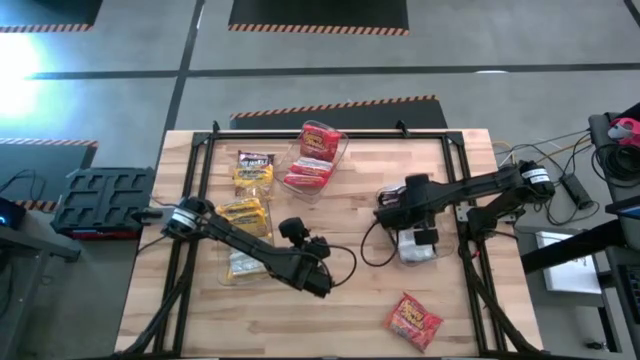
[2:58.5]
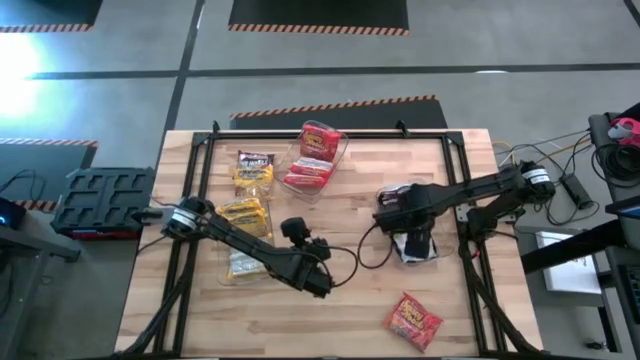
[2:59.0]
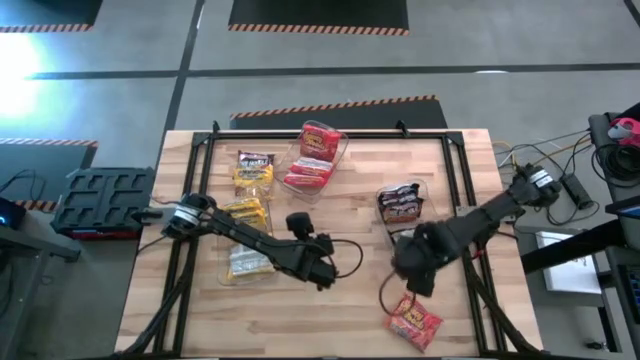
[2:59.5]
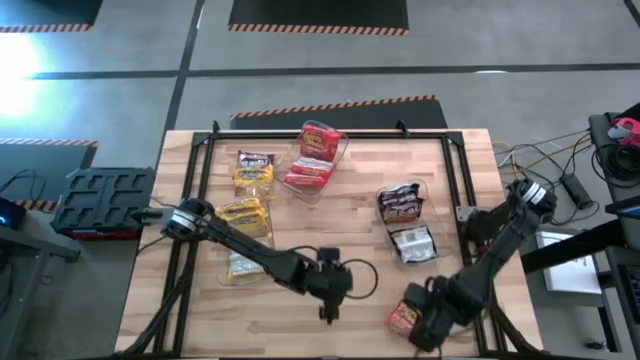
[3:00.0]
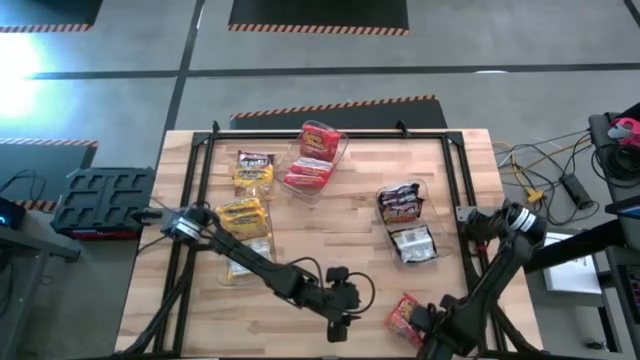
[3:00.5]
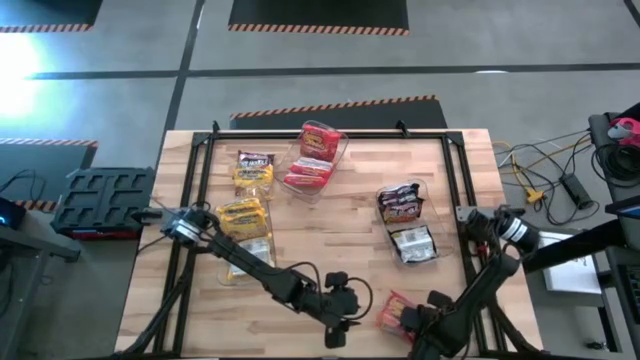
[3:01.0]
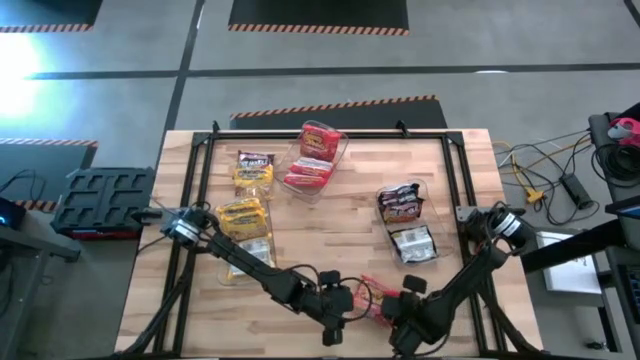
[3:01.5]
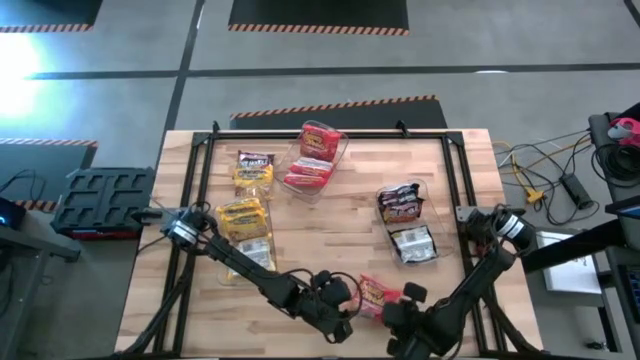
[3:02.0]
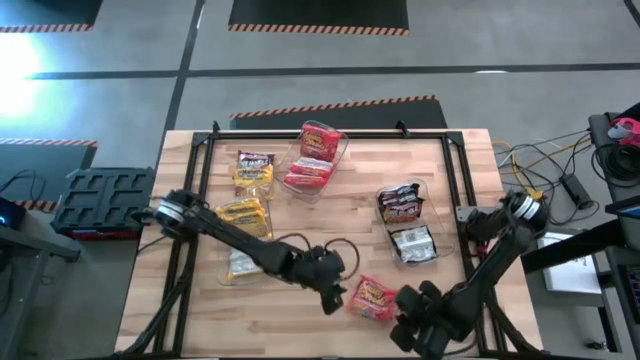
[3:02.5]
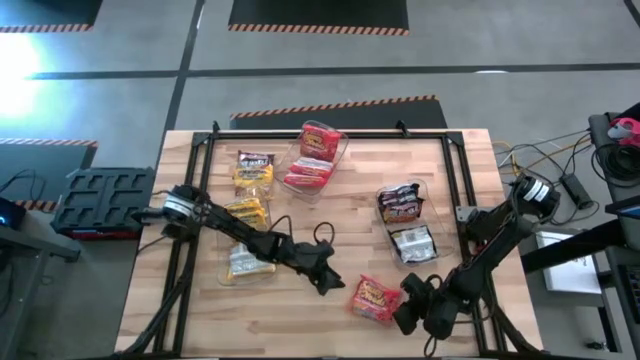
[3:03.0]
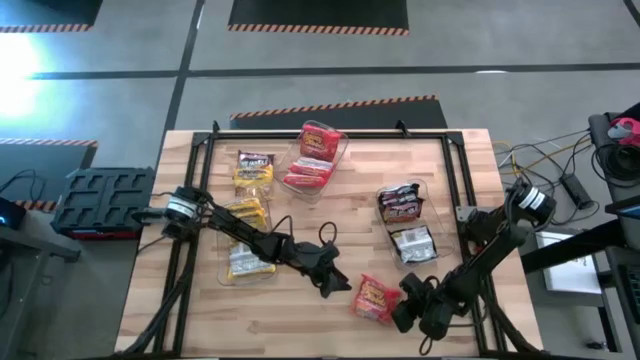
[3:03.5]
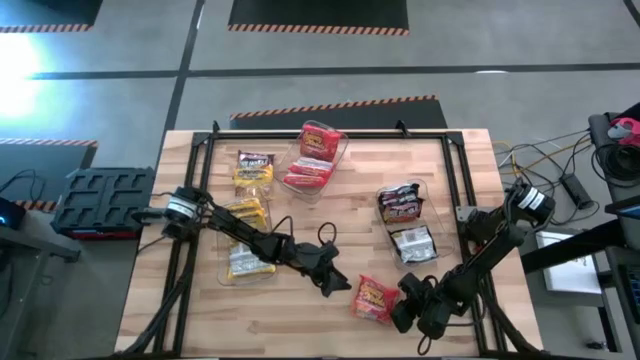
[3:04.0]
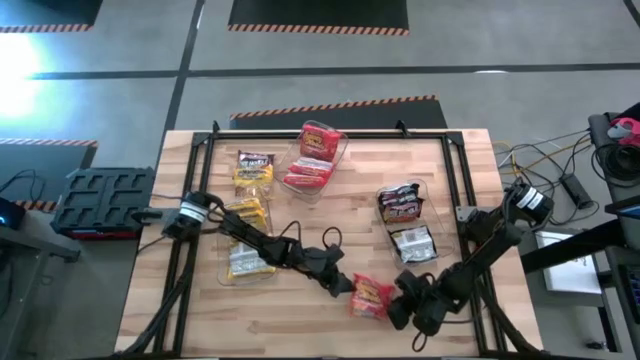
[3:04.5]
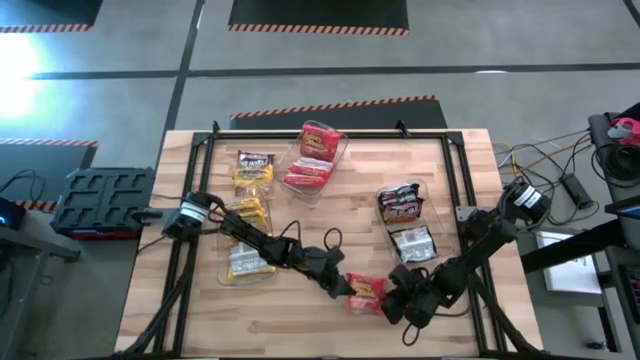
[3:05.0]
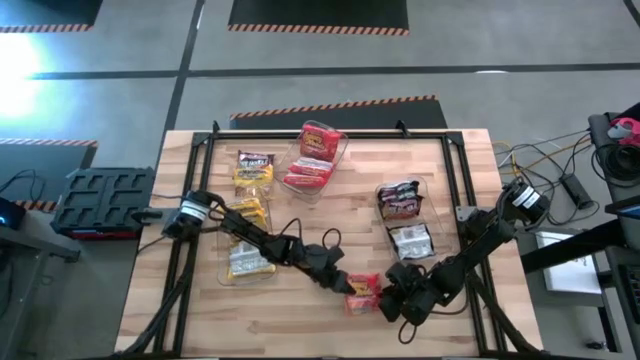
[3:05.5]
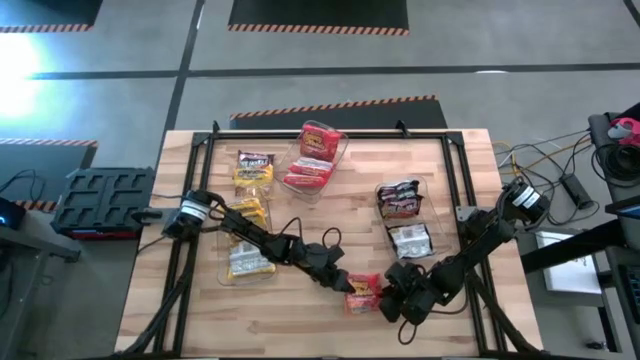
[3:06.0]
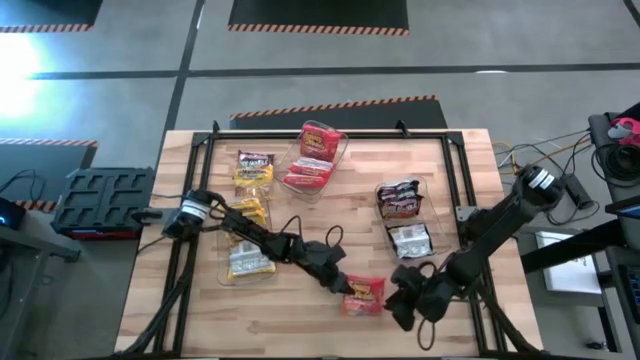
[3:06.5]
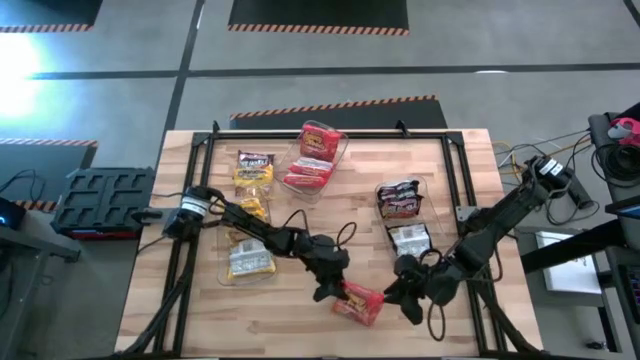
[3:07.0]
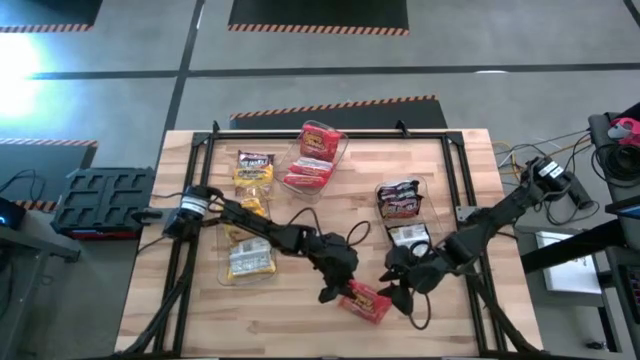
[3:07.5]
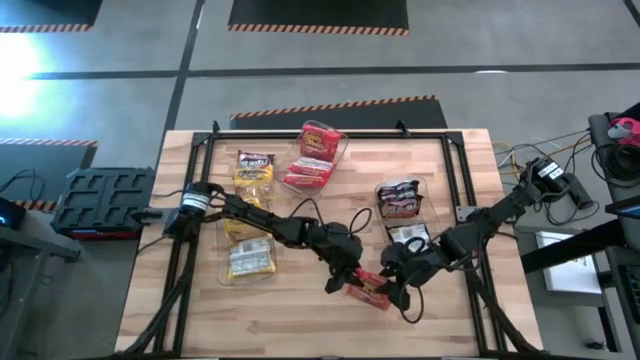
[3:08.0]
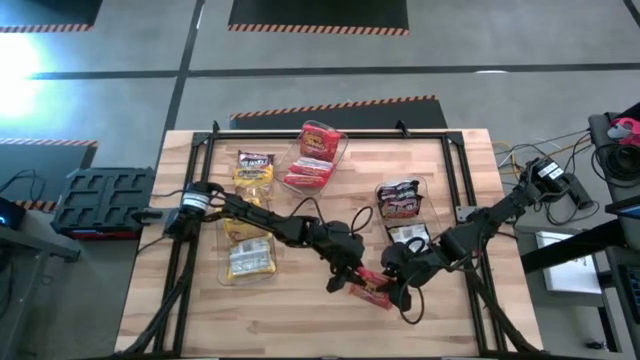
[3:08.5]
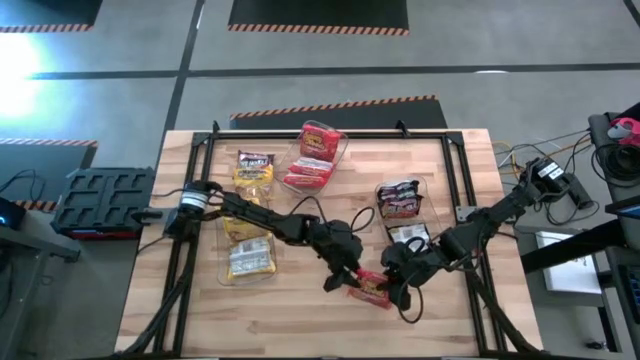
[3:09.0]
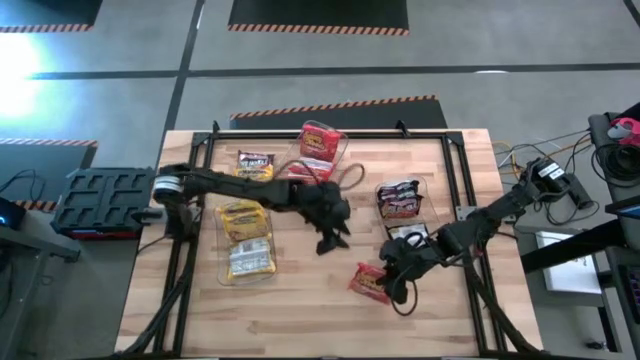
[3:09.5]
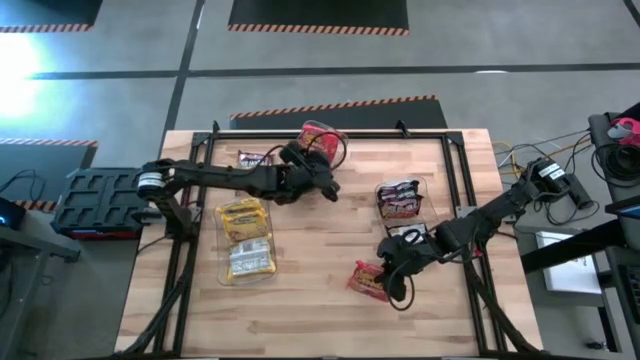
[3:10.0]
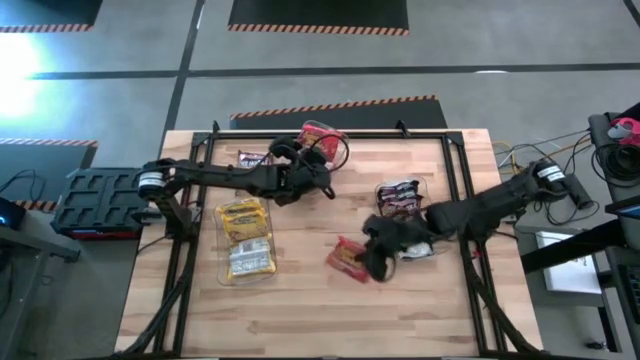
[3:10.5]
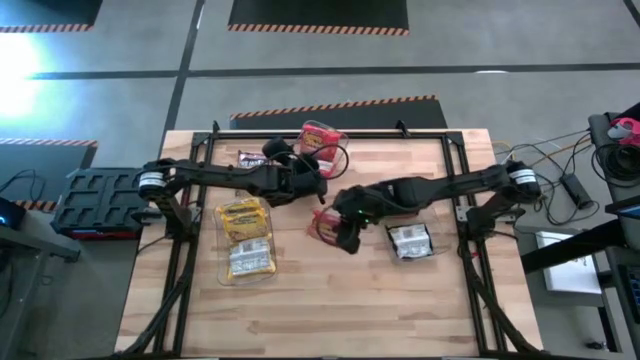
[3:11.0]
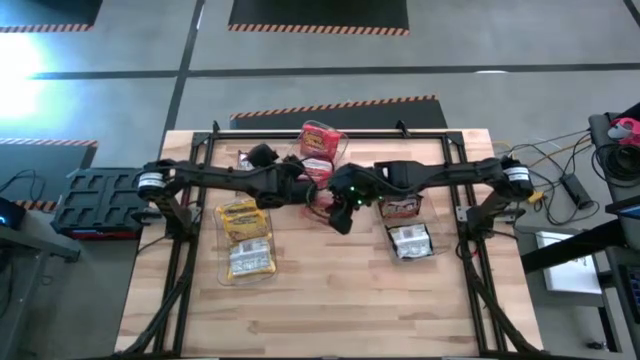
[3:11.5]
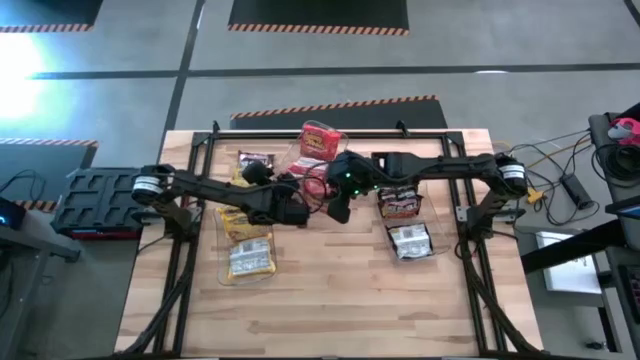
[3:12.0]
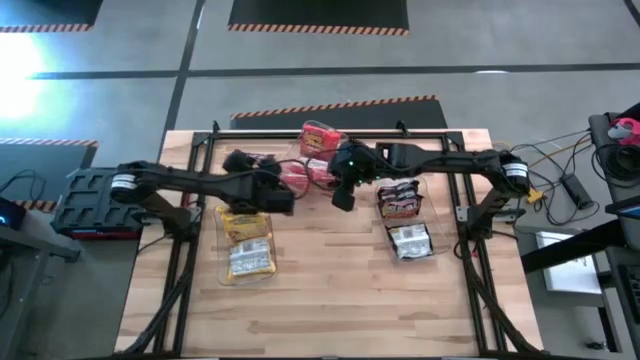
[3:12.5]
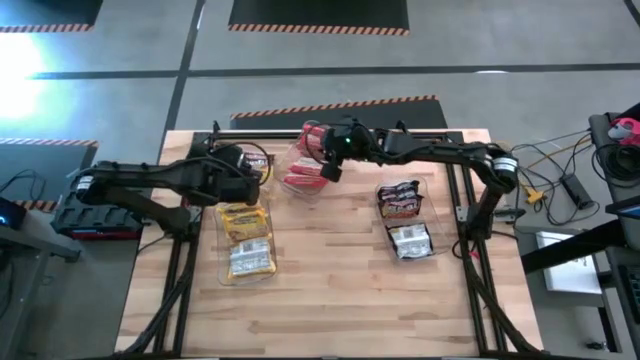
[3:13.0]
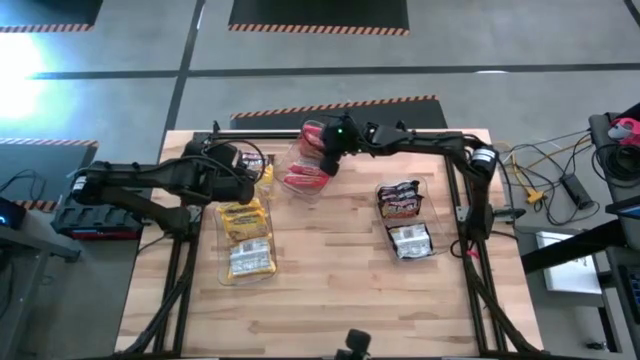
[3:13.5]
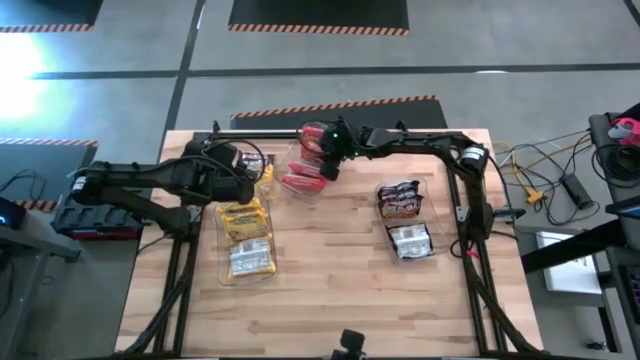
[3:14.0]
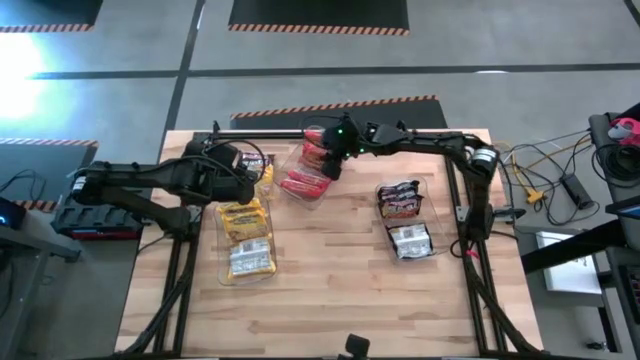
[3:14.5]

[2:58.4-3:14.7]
Task: Sort Maruchan noodles
Put the orange pack noodle into the top transparent bin

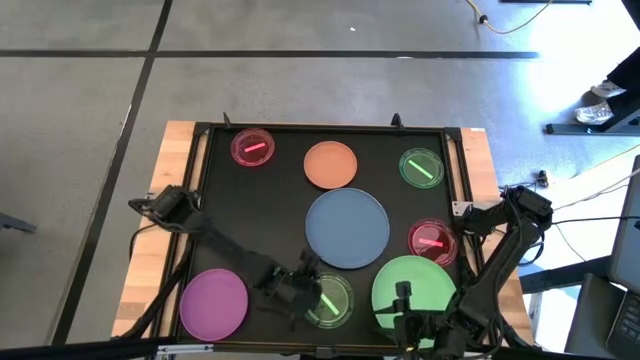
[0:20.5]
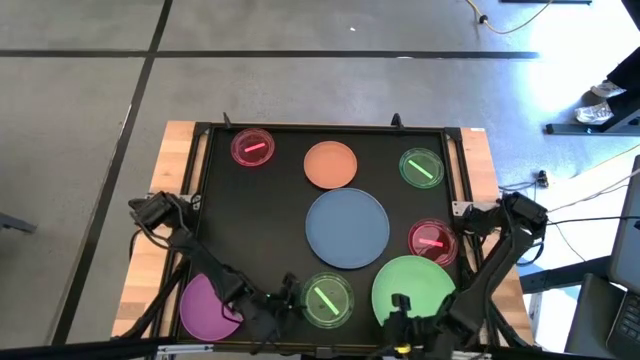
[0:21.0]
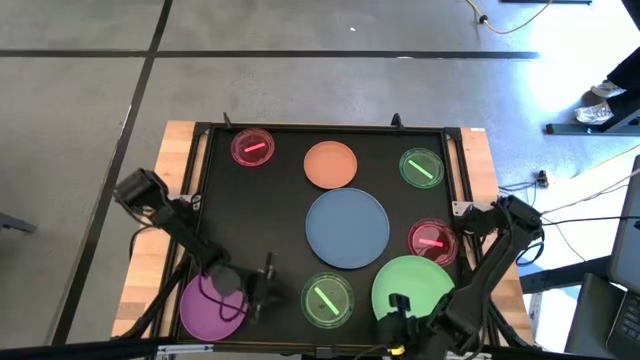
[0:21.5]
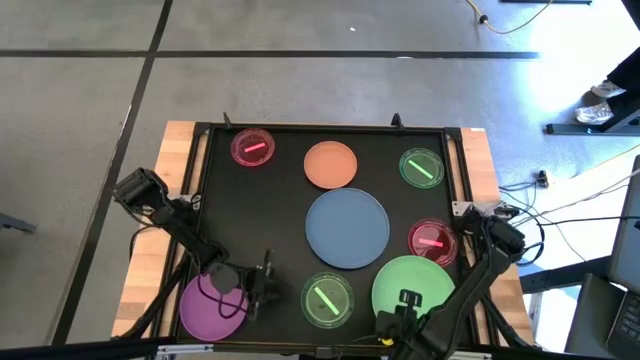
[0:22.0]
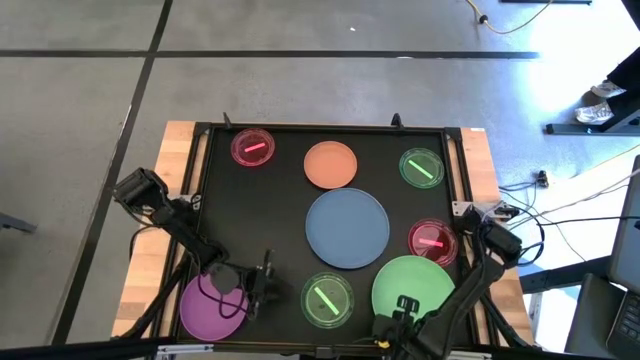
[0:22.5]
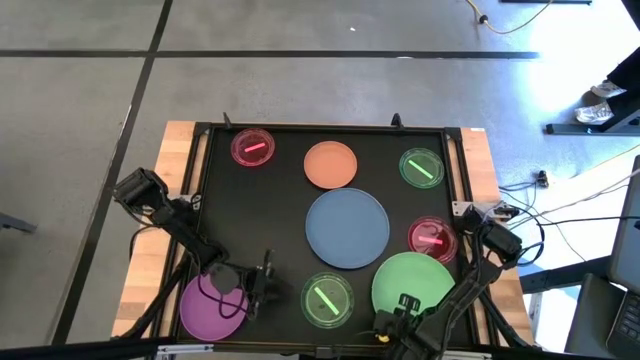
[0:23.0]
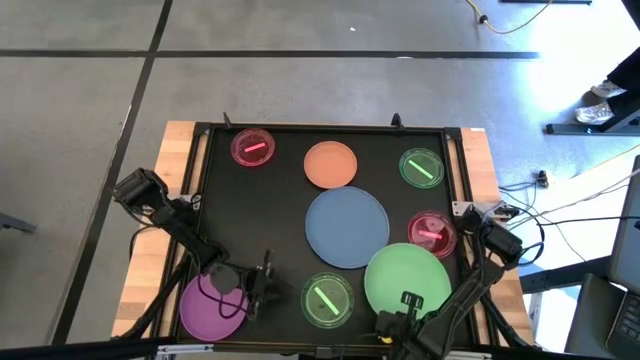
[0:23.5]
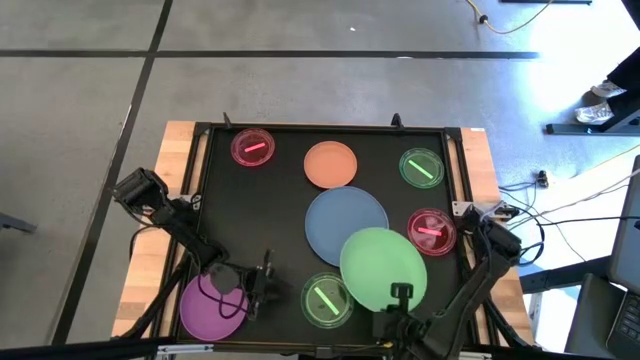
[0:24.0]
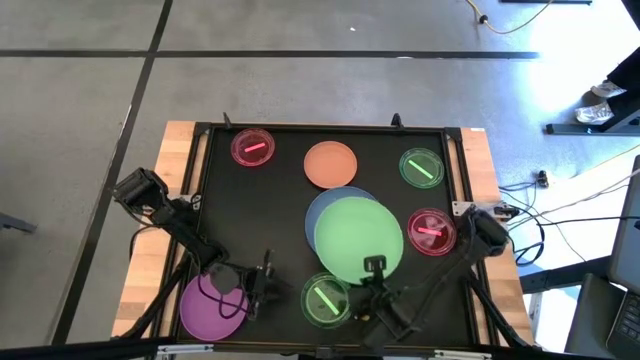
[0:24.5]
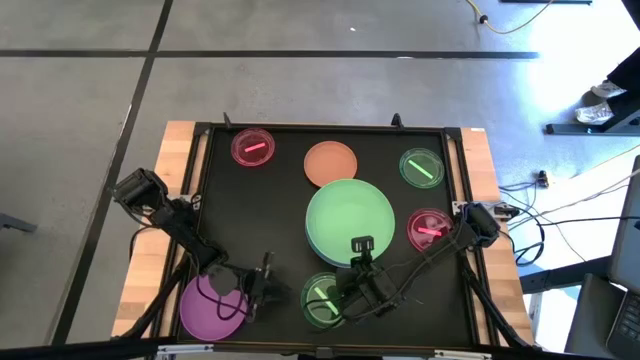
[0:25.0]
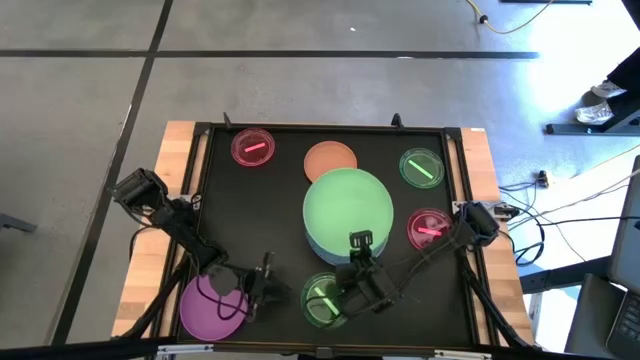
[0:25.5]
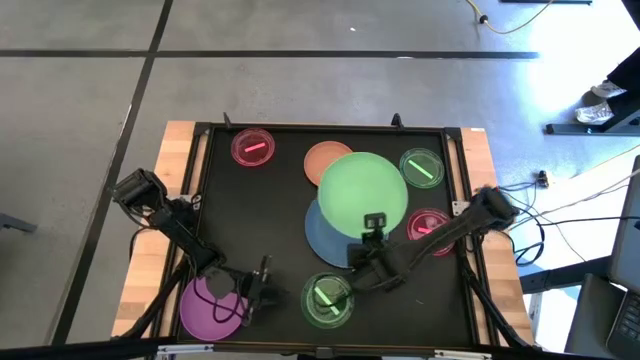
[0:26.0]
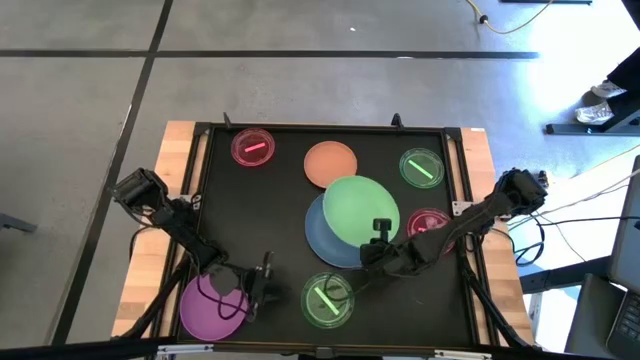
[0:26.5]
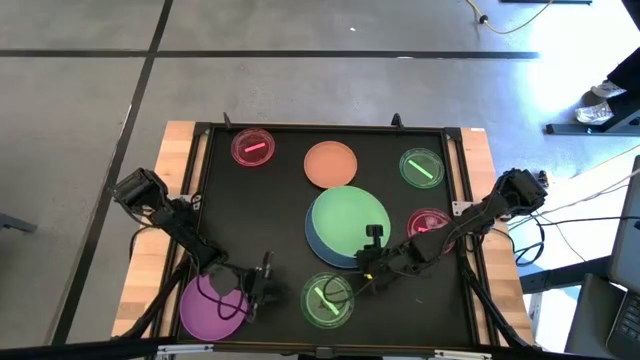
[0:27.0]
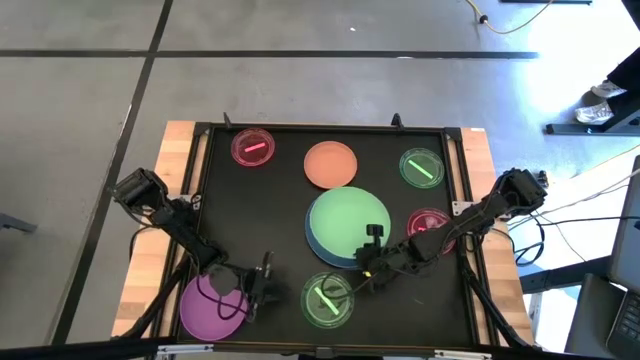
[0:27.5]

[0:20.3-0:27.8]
Task: Stack plastic plates
Stack the green plate on top of the blue plate
